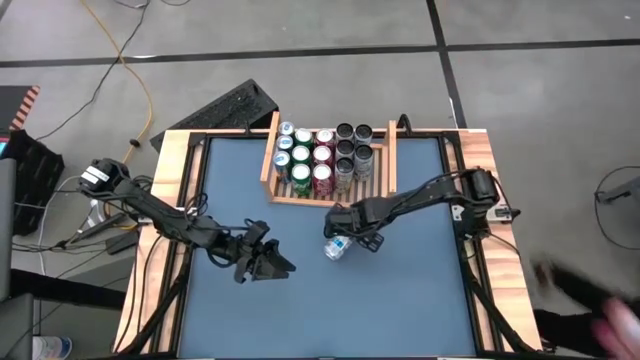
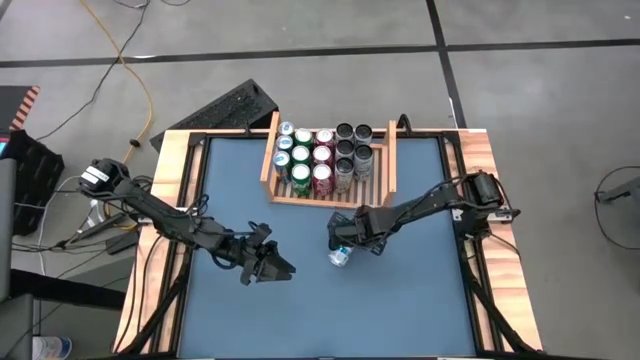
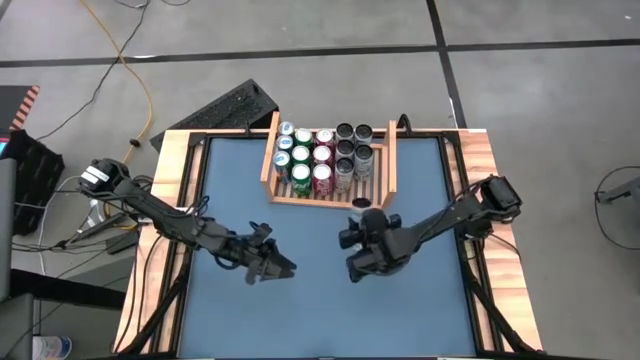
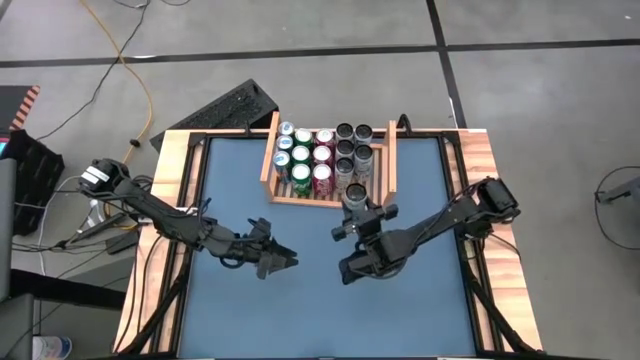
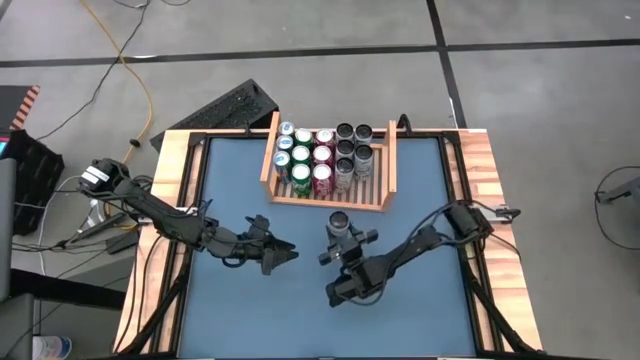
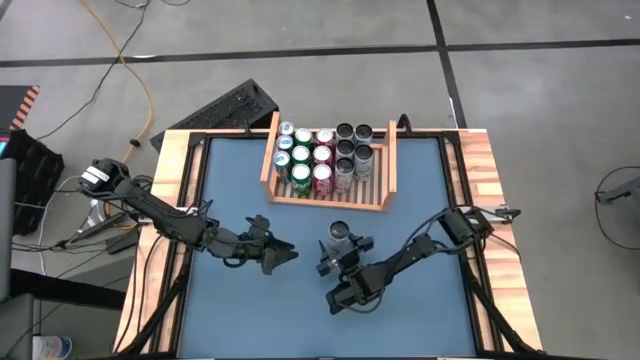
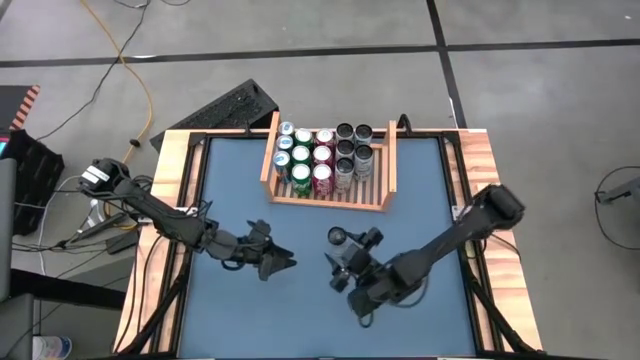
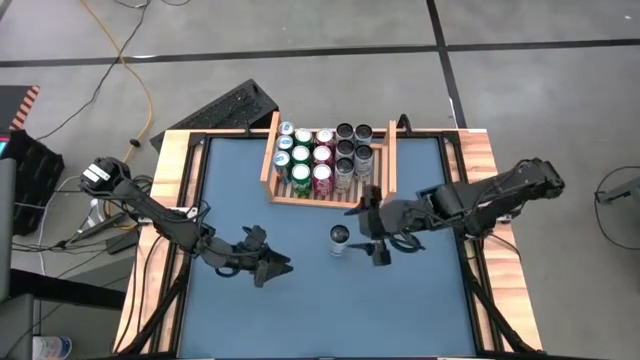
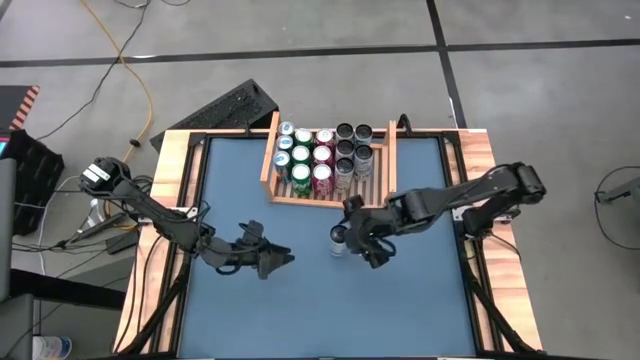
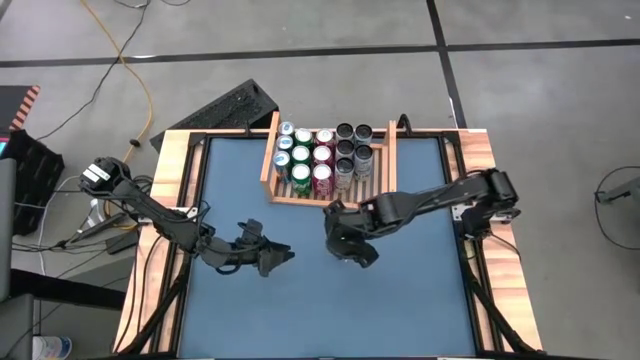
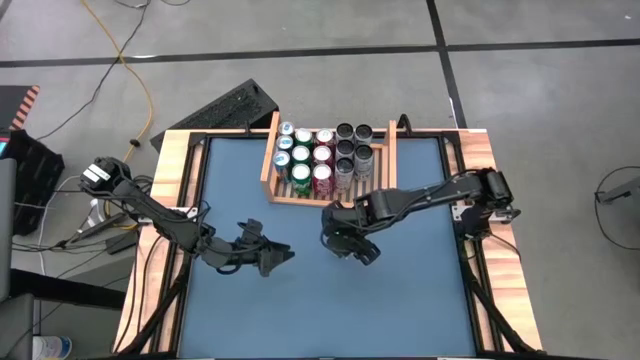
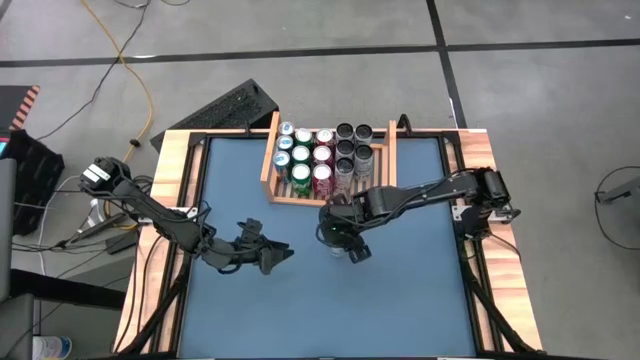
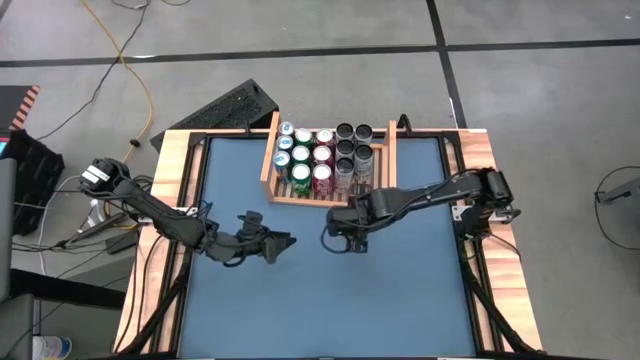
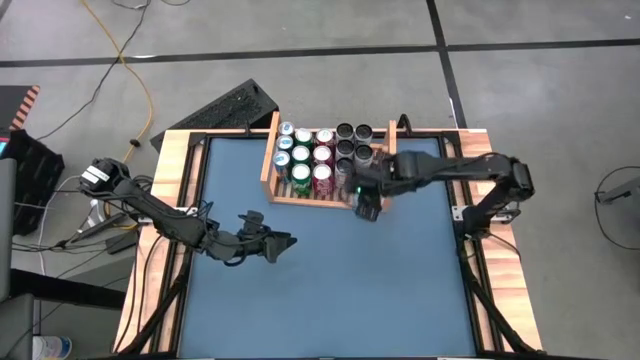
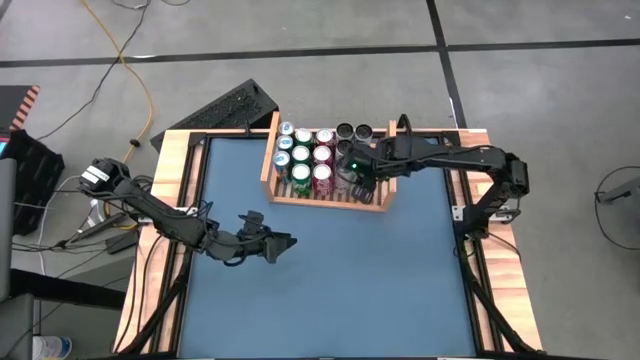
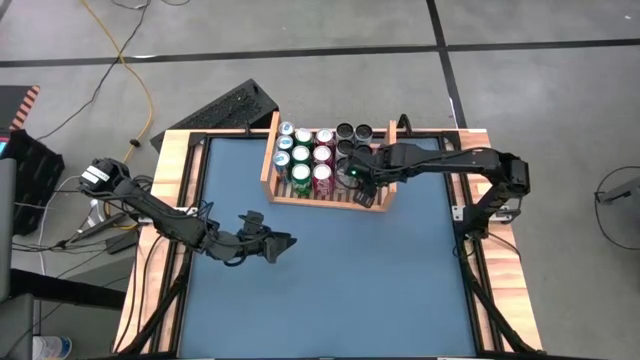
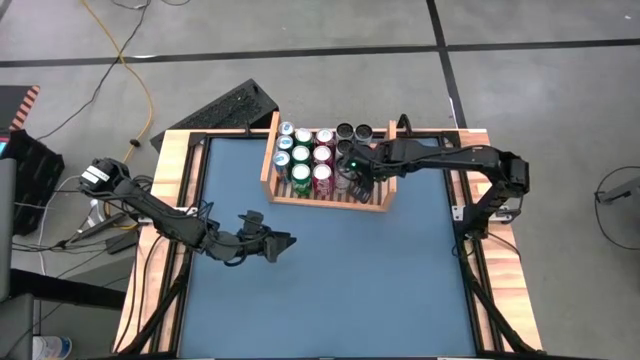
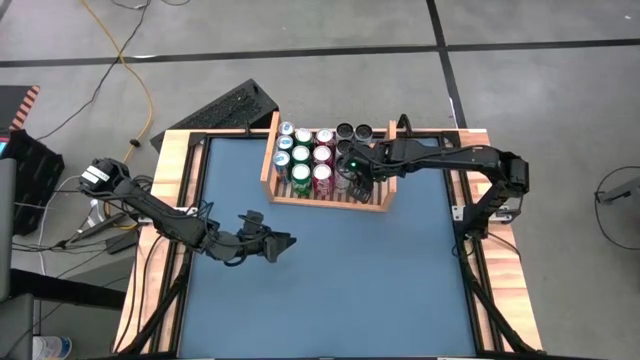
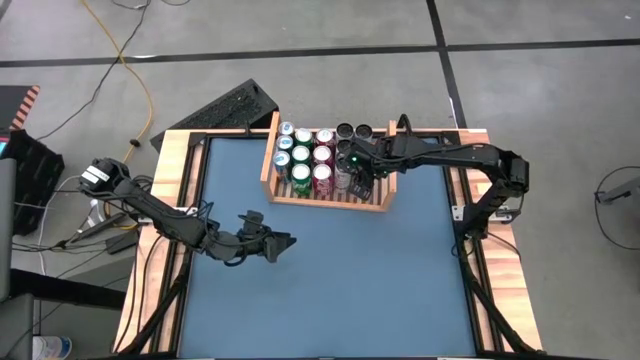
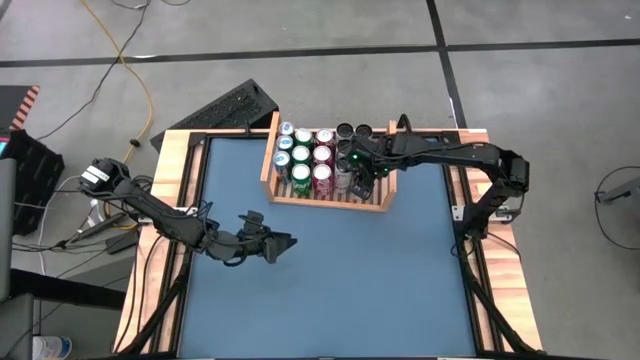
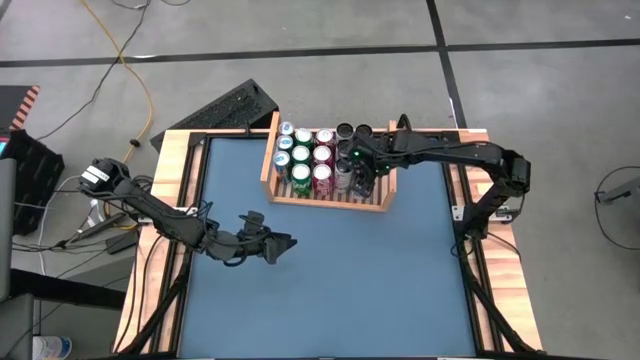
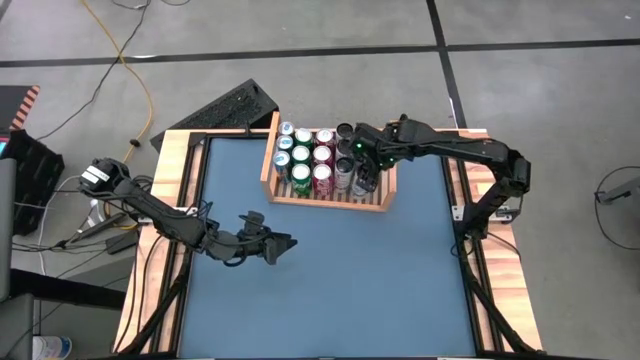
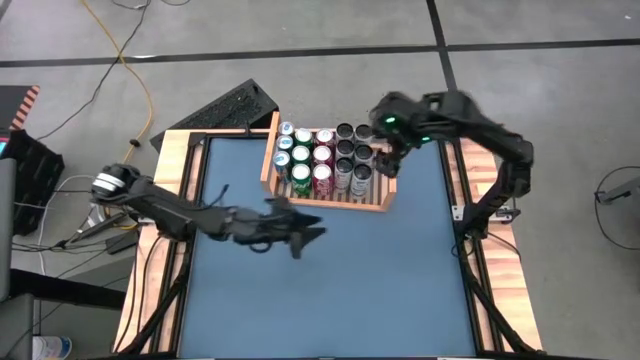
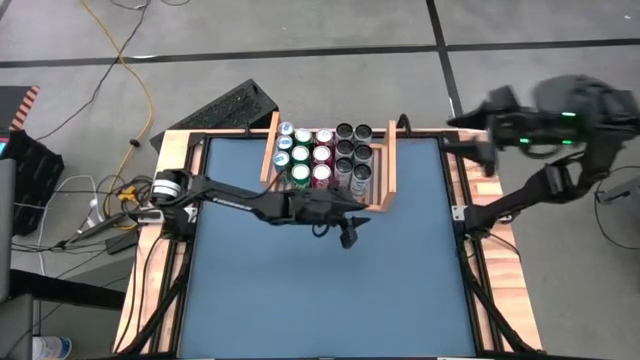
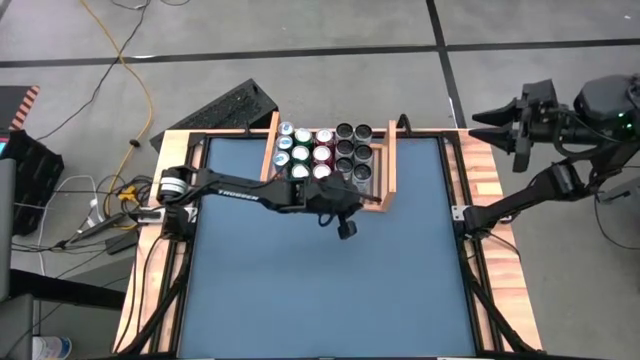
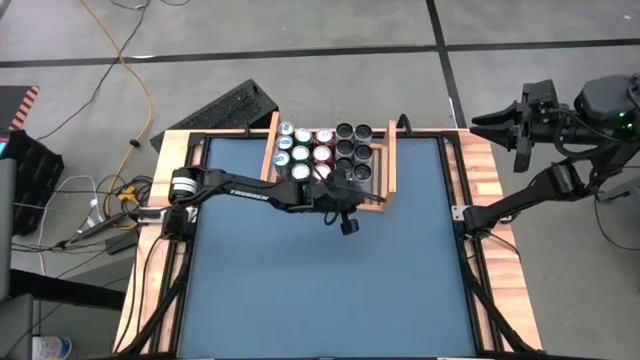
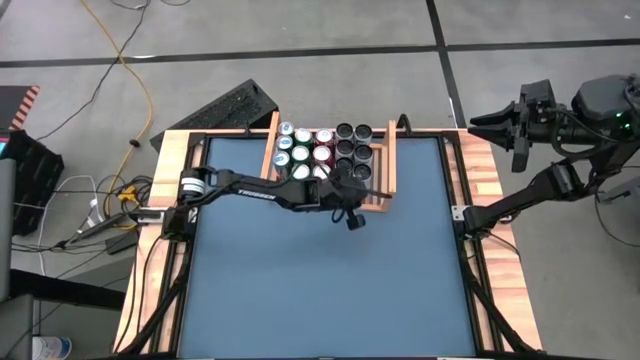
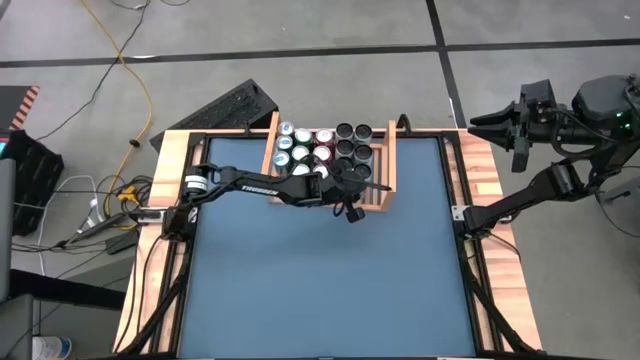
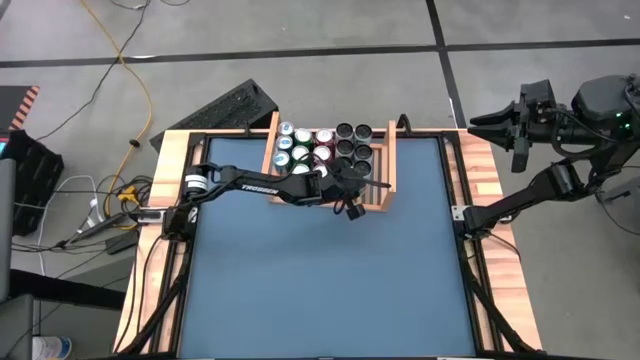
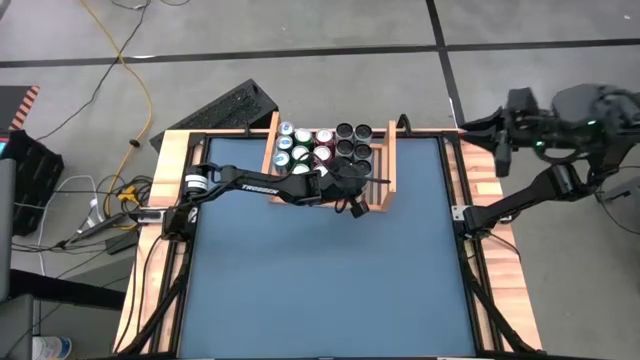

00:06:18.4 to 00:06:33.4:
Task: Place canned beverage on shelf
Put the light blue soda can on the shelf

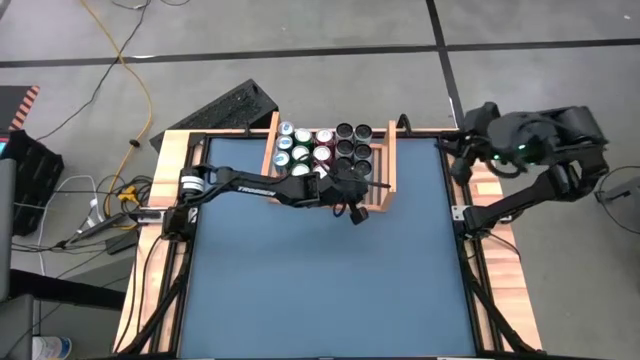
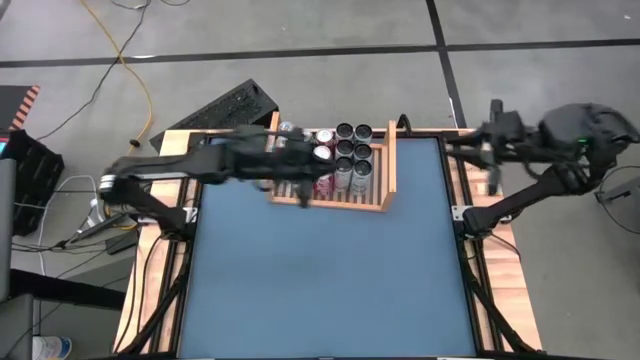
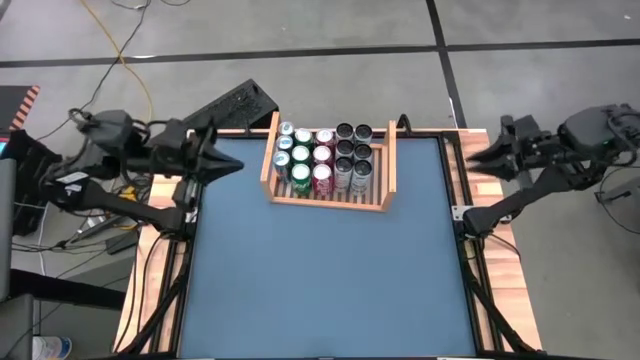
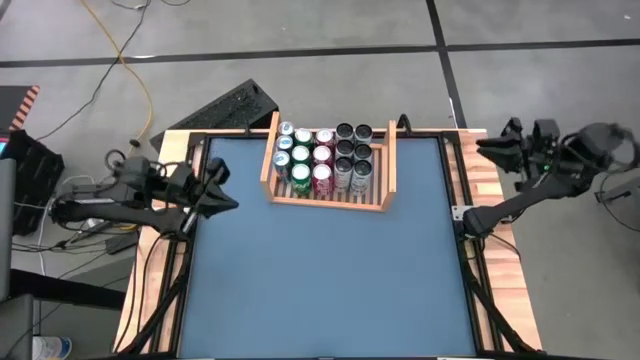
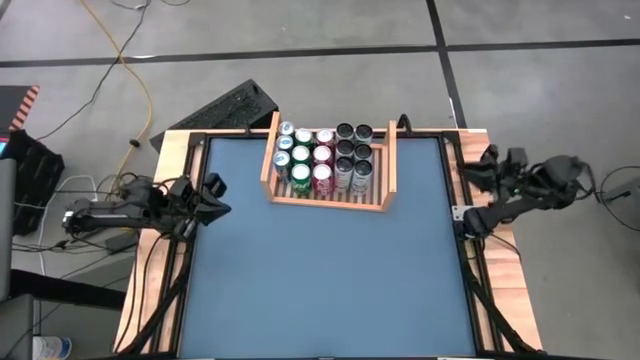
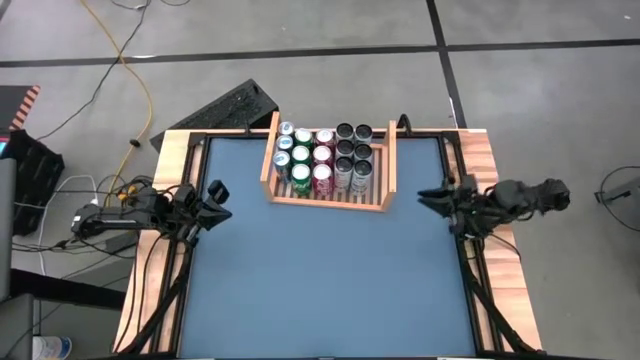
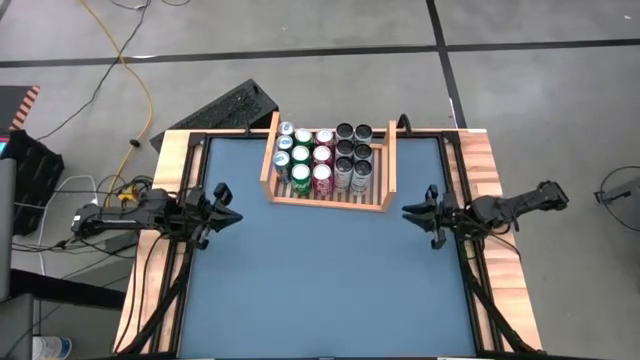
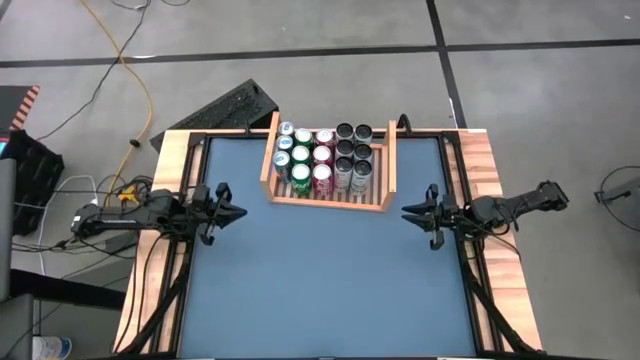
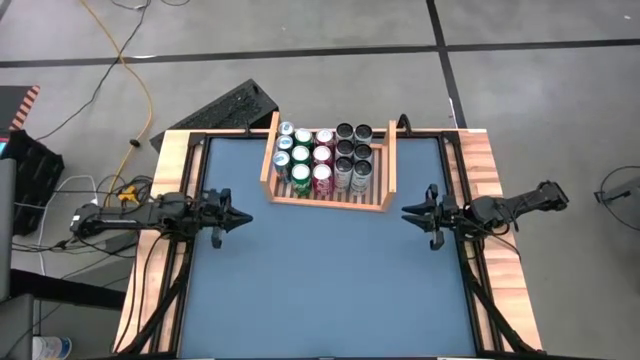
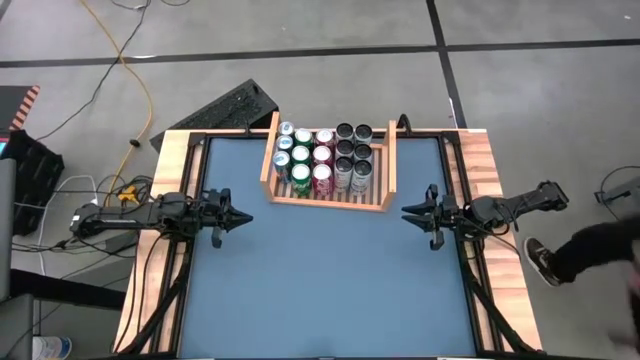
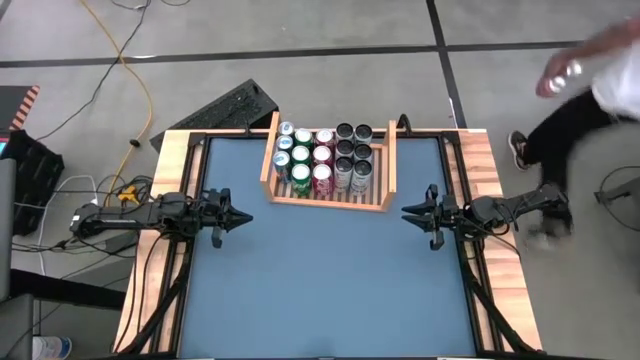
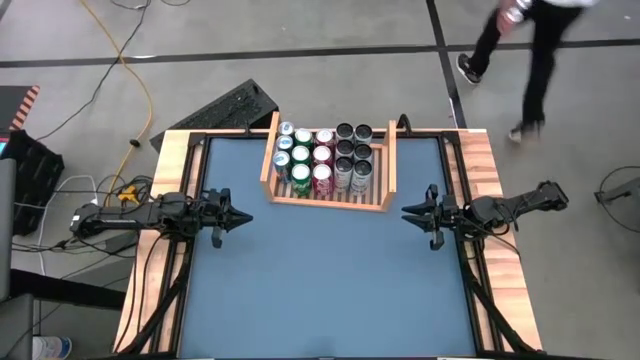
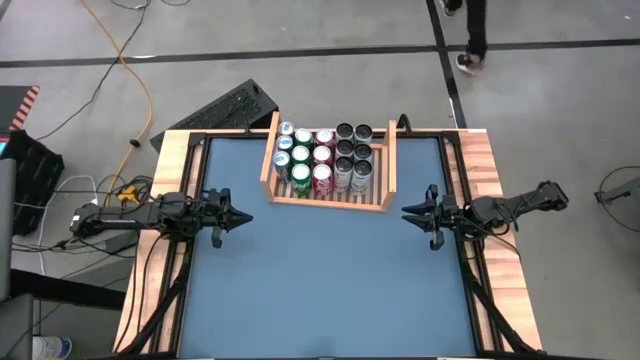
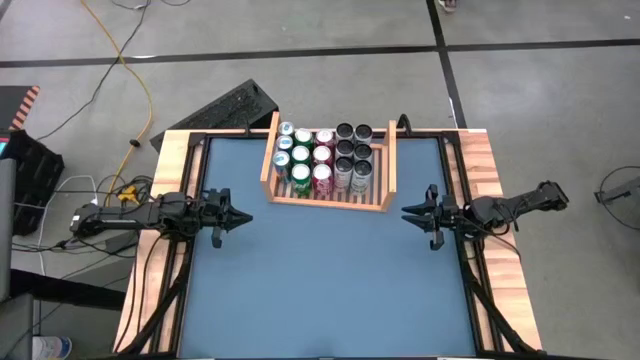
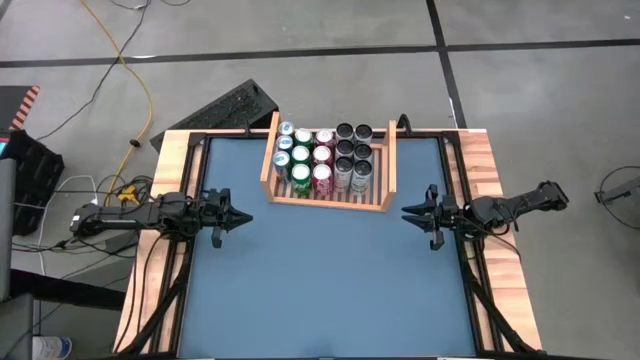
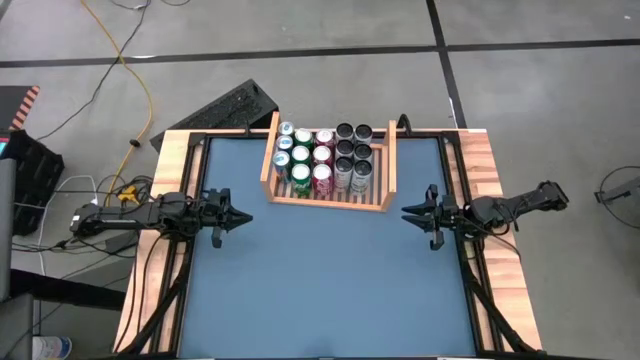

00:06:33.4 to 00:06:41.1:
Return to Home Position
